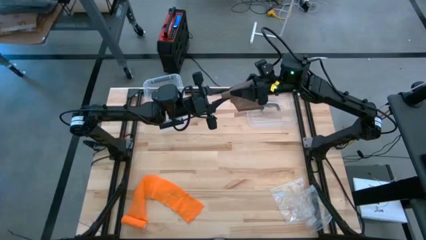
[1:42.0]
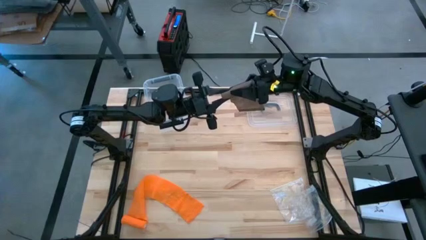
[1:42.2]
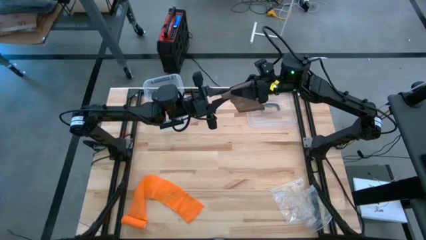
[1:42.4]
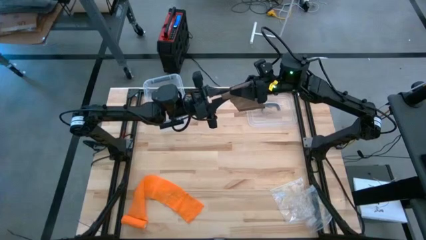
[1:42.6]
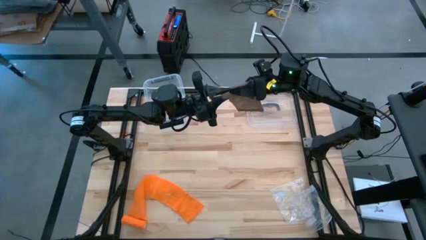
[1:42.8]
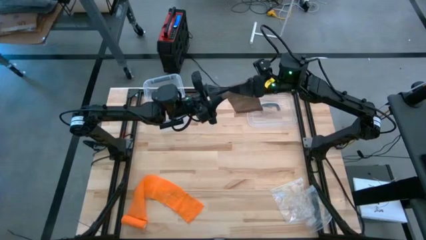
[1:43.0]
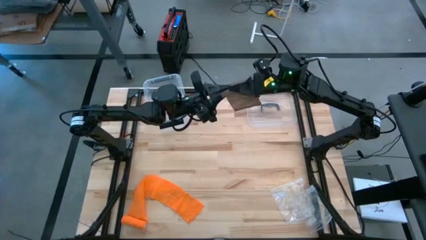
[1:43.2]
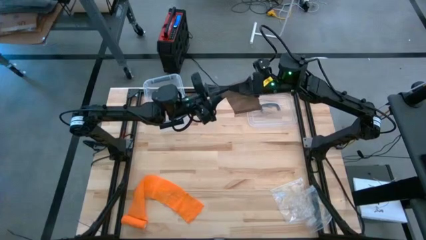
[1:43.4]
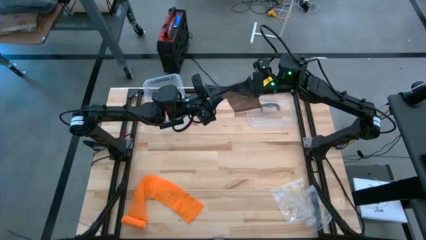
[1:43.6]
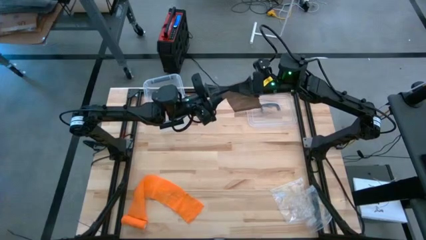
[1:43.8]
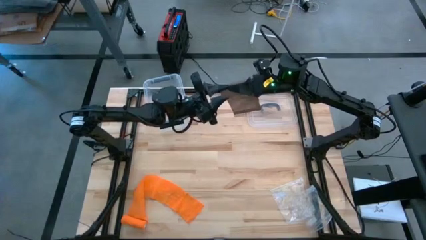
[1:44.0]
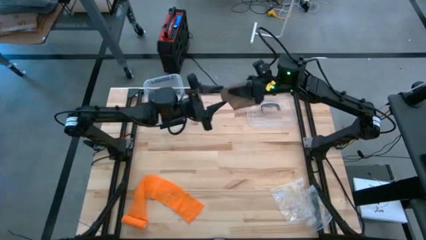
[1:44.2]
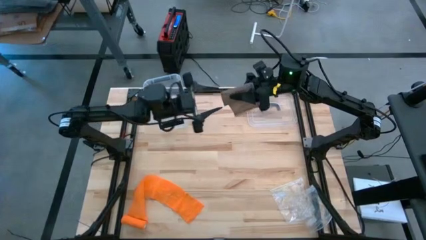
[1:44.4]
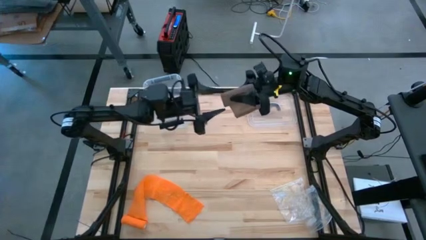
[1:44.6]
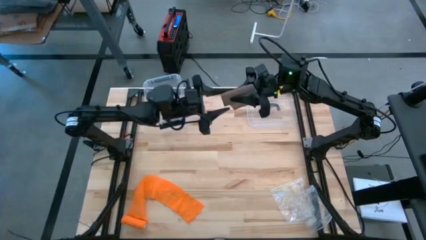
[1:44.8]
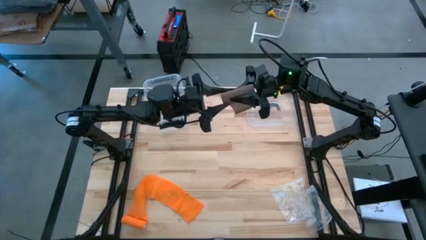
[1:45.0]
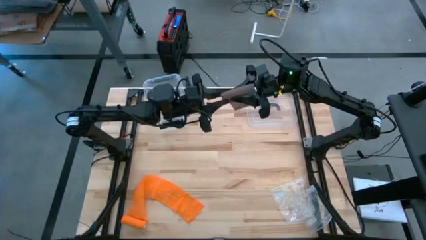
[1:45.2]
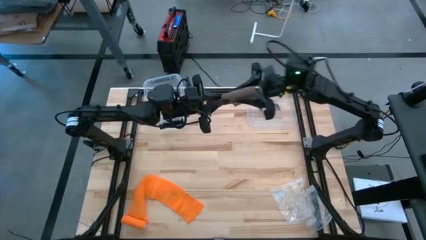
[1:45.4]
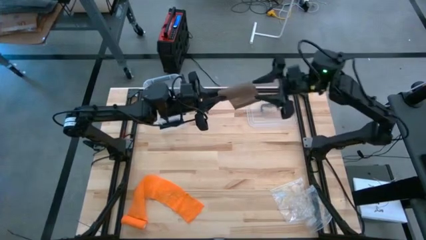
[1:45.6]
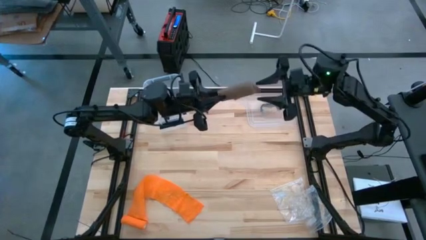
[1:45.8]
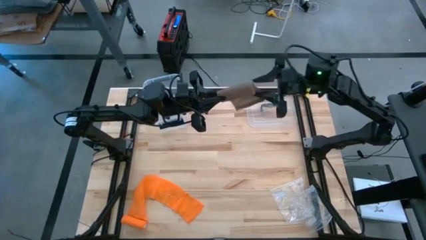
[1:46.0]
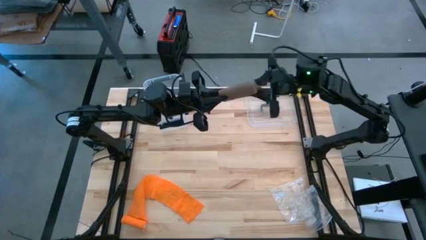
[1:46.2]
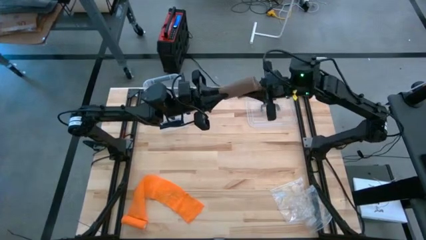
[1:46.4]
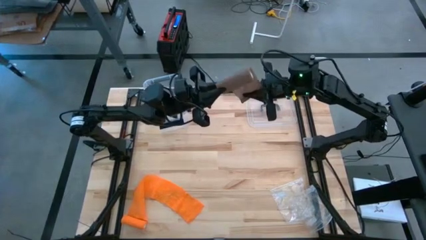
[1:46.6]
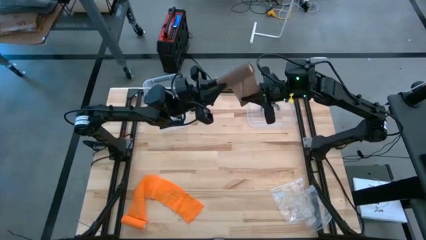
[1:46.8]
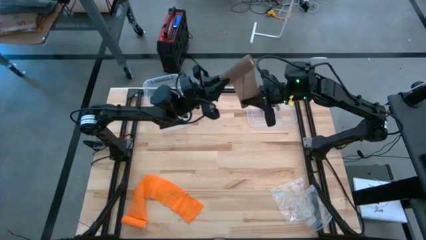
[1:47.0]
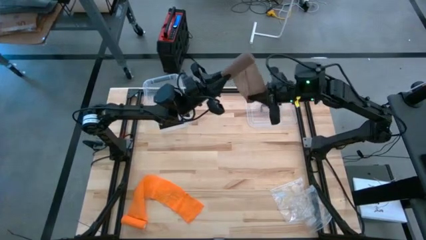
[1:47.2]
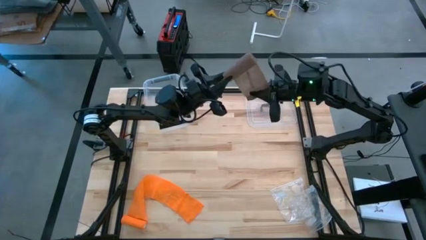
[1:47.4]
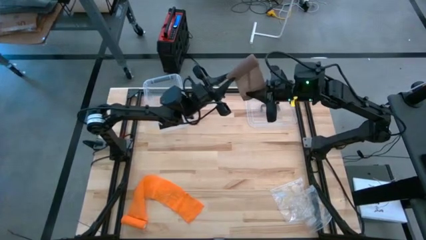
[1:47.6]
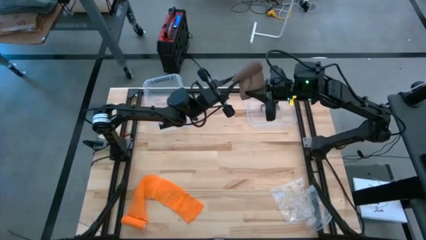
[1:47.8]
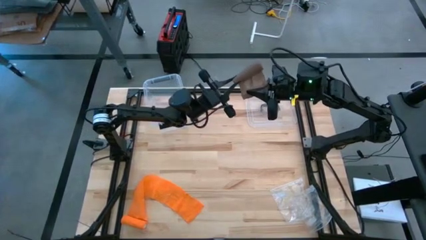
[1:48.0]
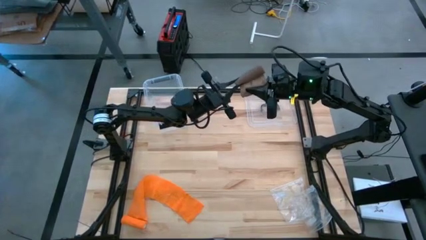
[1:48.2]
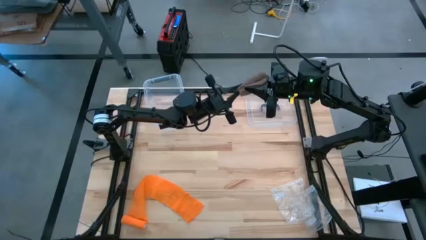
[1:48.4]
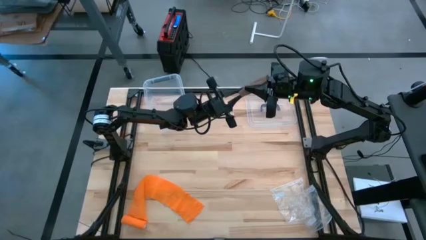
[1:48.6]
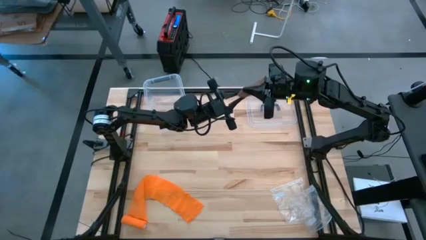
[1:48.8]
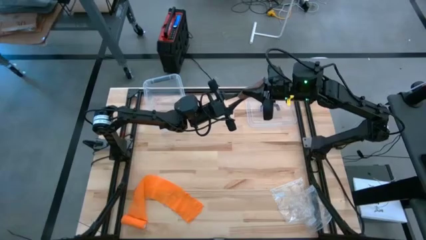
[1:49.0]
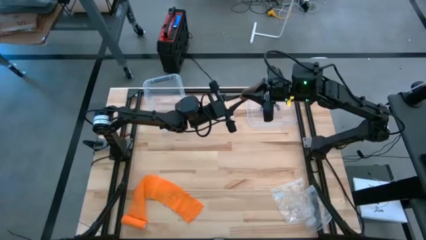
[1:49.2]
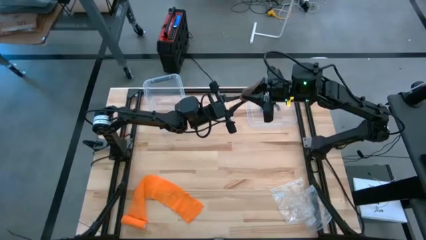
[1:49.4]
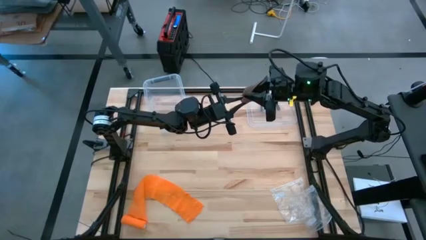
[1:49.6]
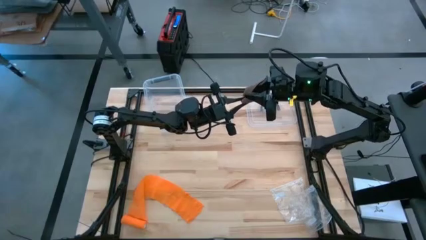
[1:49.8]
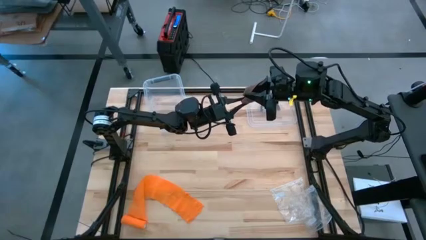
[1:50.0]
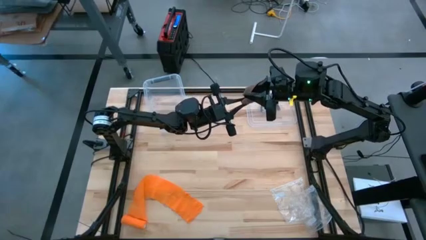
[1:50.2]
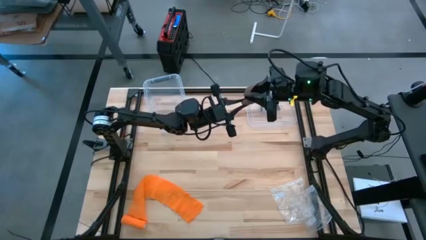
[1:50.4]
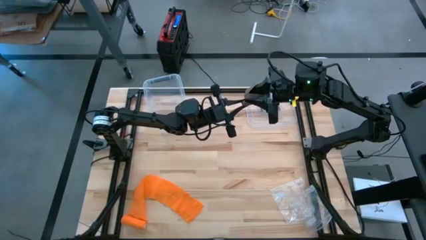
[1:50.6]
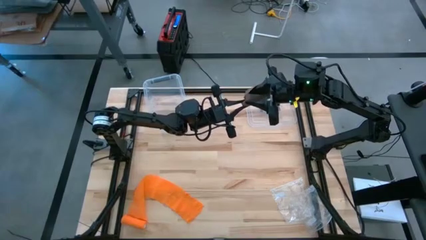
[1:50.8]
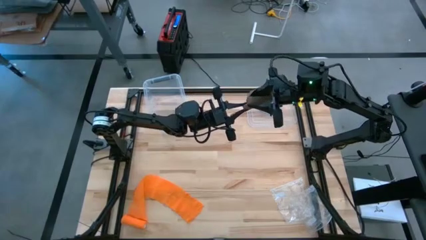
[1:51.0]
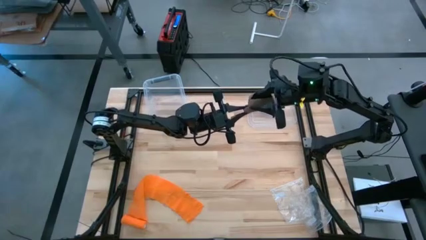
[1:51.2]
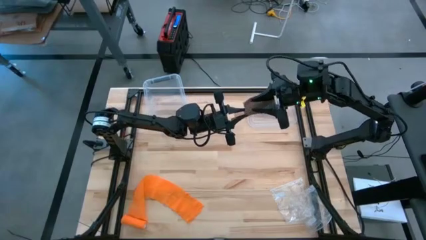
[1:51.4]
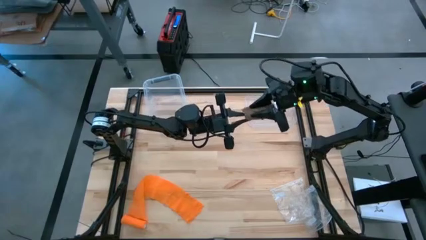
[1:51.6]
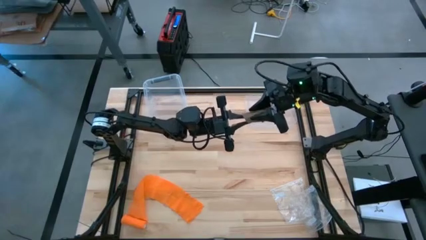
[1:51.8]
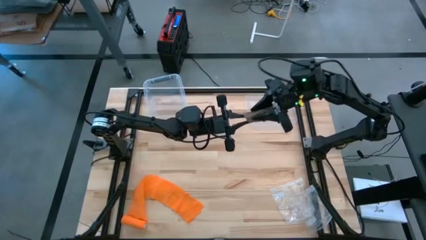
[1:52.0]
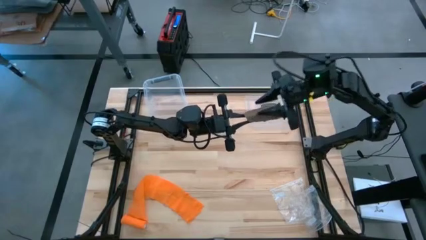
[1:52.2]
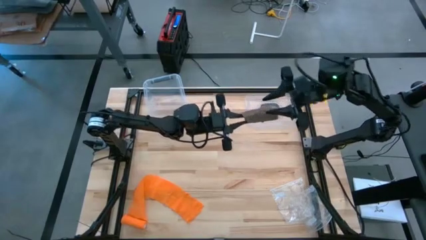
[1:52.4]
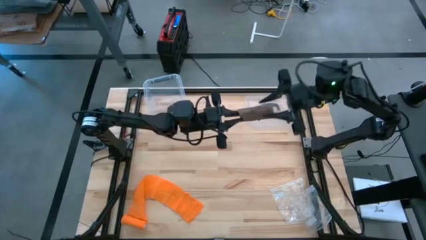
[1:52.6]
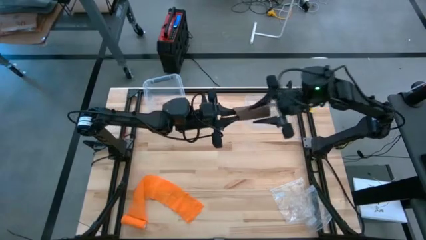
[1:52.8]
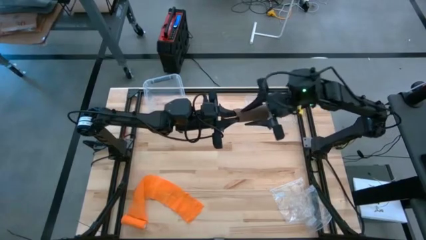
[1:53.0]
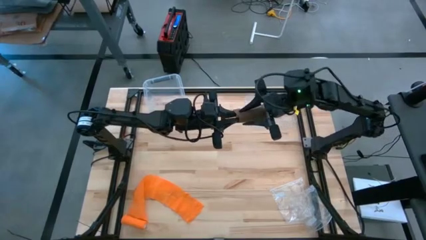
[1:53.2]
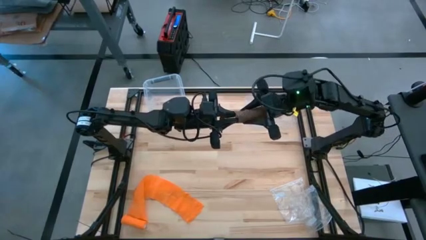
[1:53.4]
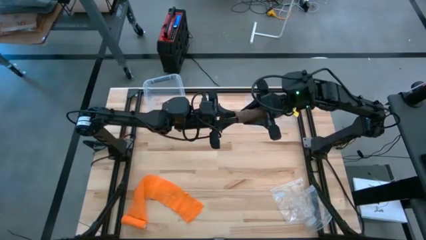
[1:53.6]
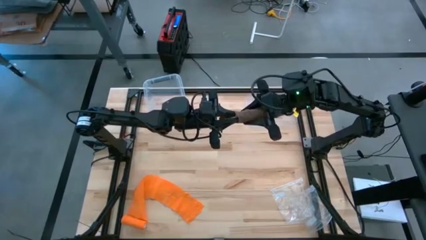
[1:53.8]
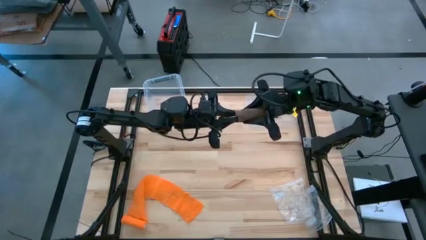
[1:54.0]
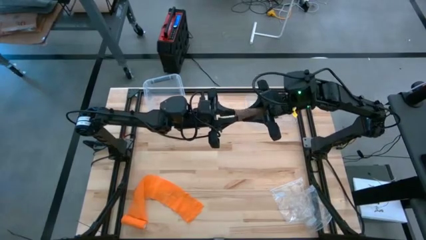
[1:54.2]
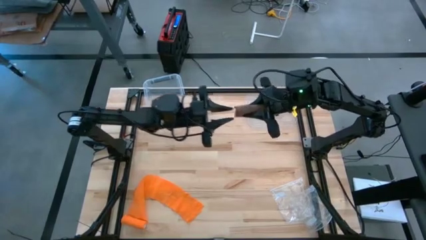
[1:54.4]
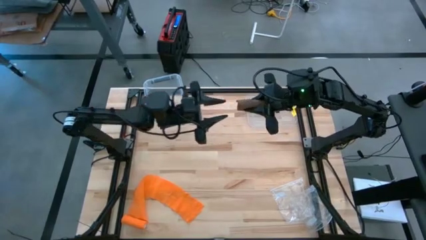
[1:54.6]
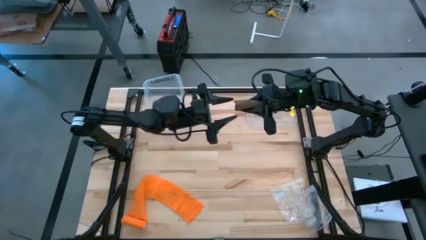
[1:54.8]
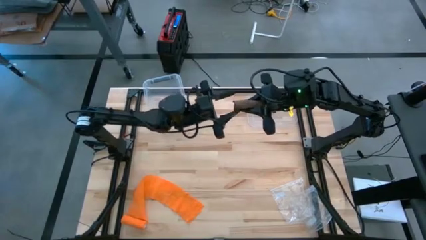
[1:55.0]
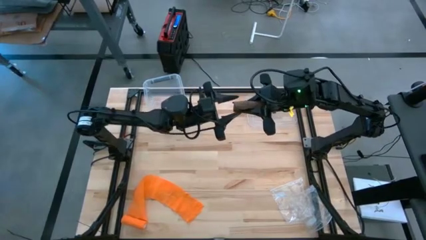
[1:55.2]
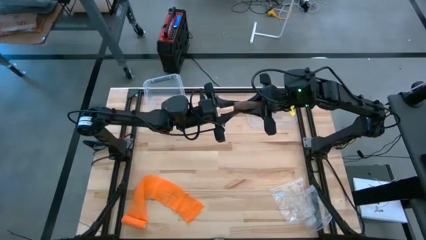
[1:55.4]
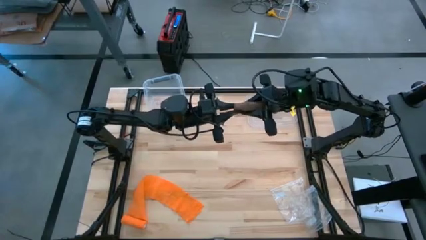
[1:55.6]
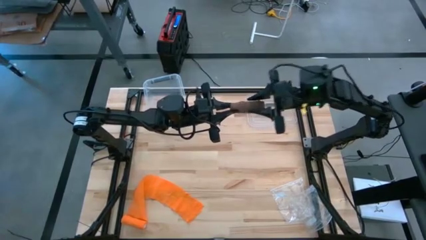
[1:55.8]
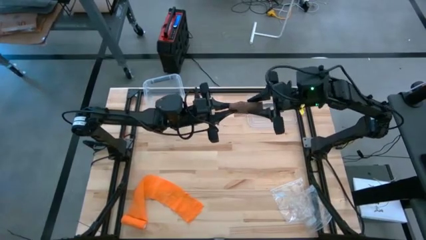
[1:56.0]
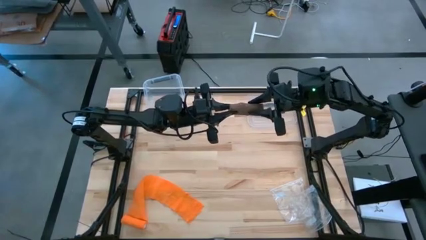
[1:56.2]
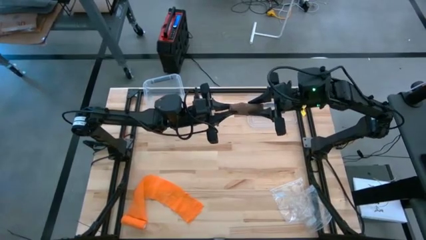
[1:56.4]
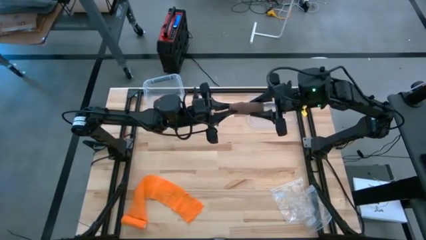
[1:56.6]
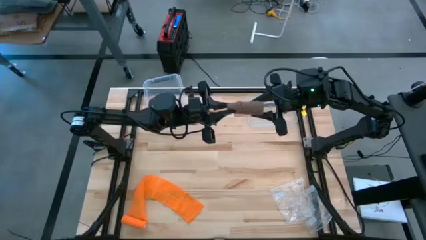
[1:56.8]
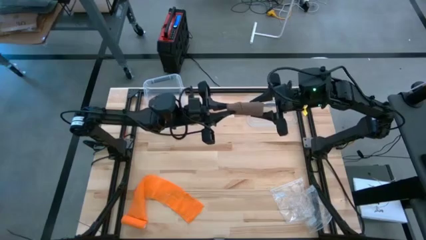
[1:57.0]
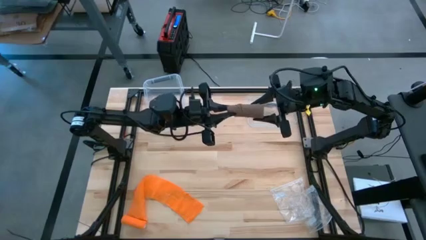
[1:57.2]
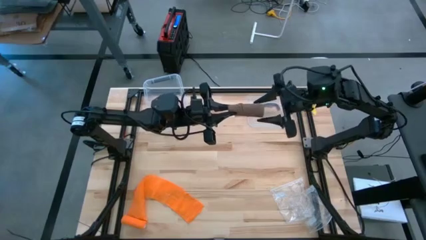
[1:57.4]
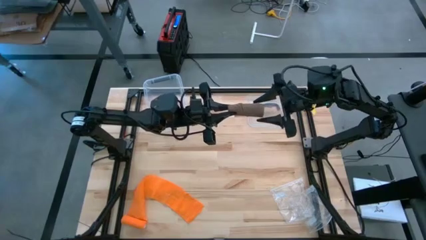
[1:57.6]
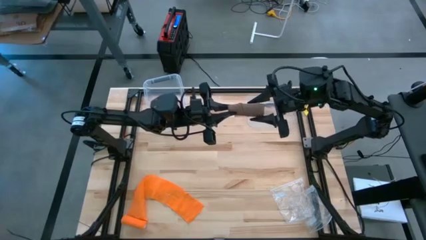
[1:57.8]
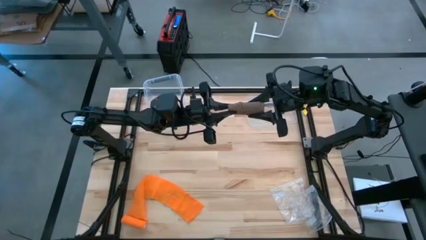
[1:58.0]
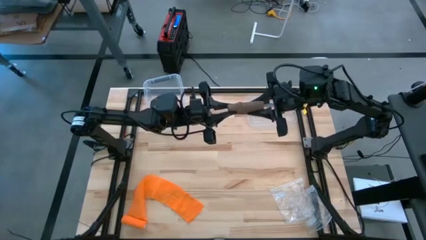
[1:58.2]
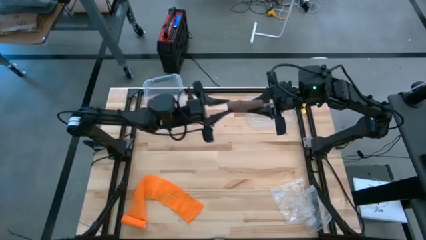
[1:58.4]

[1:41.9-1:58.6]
Task: Roll bandage
Roll the brown bandage
